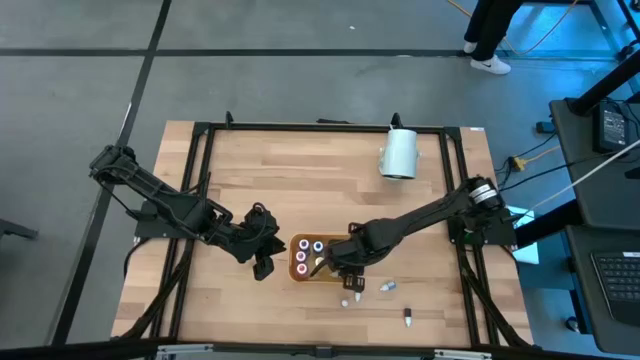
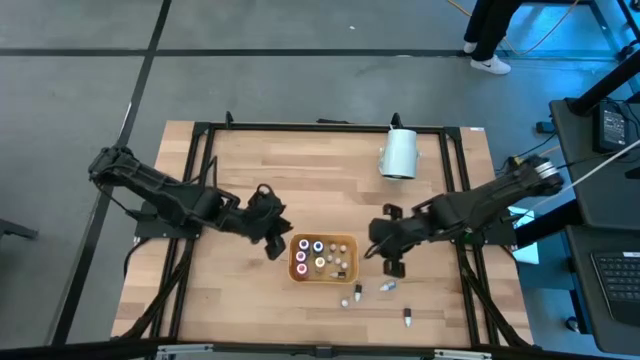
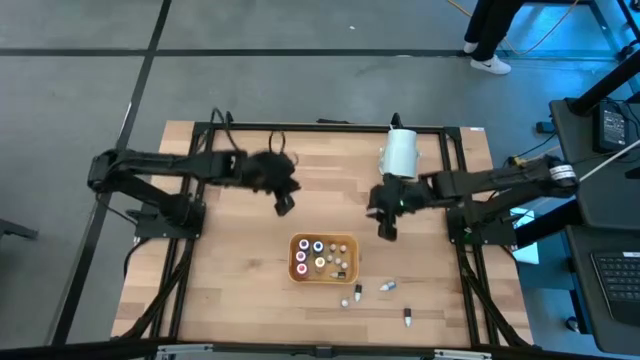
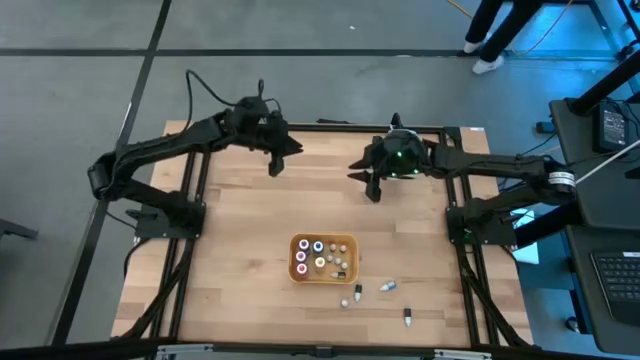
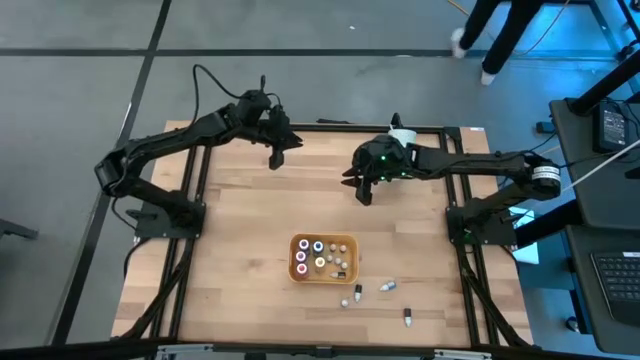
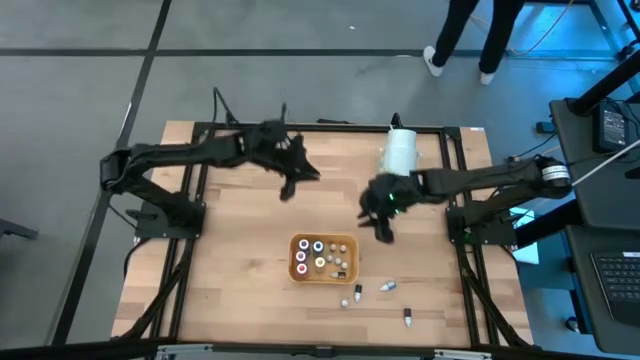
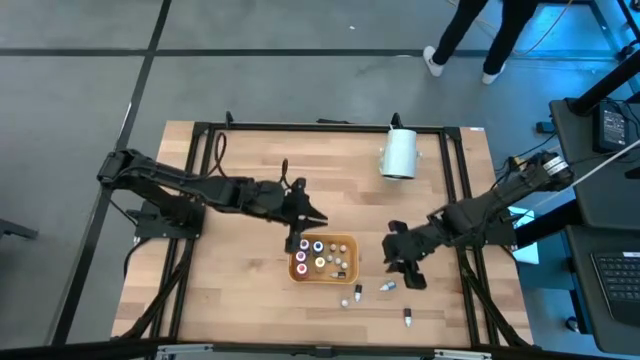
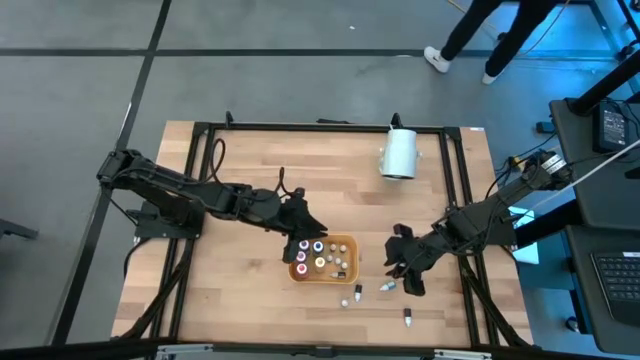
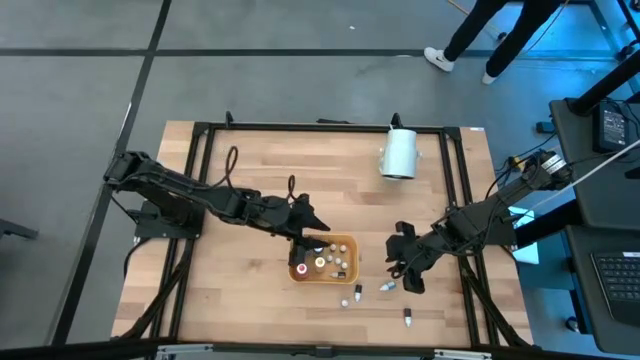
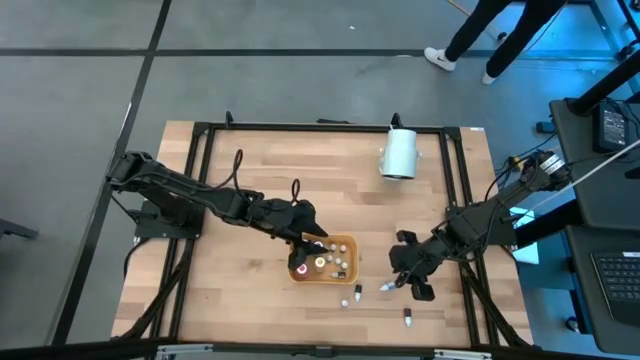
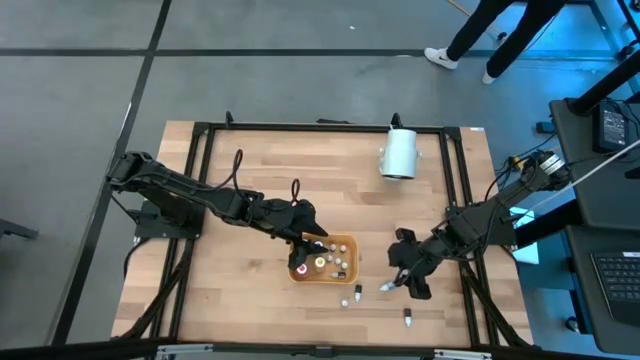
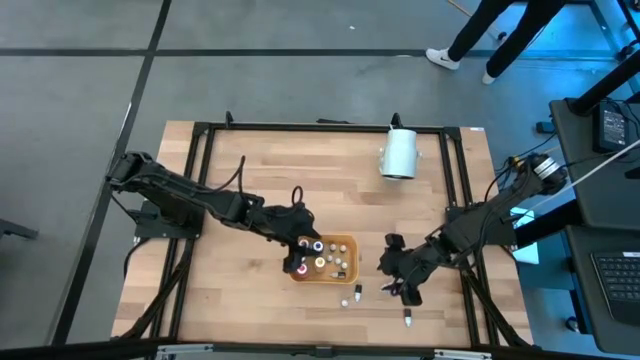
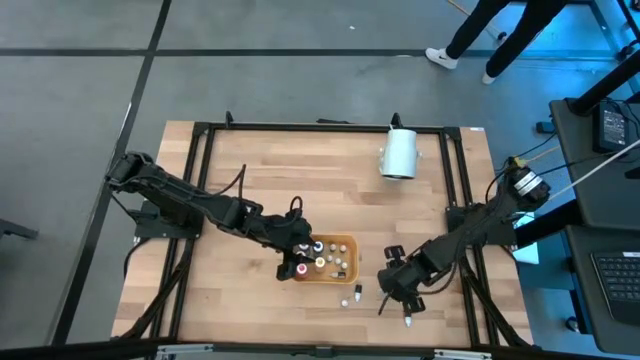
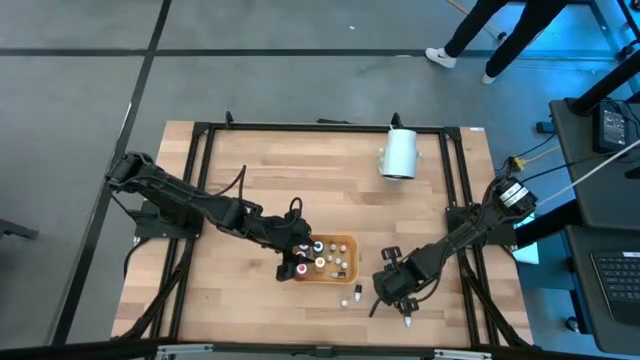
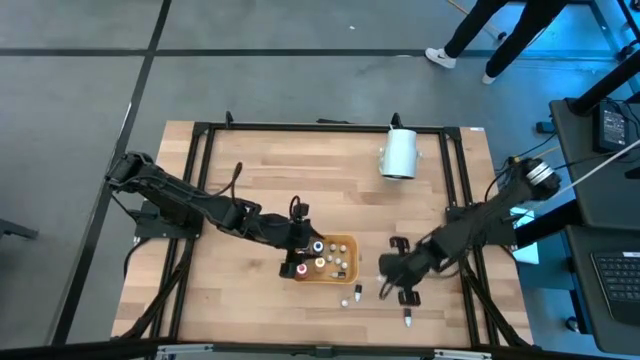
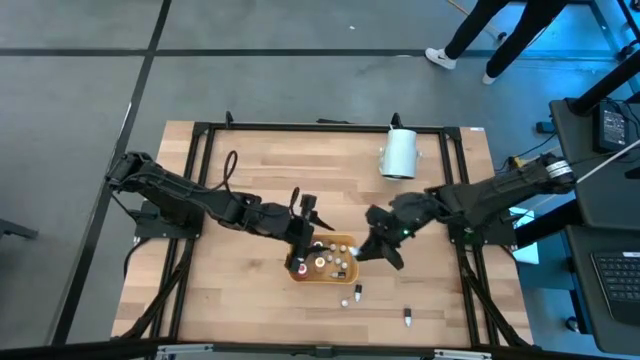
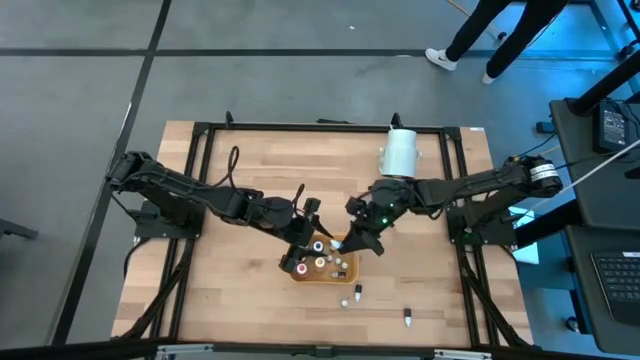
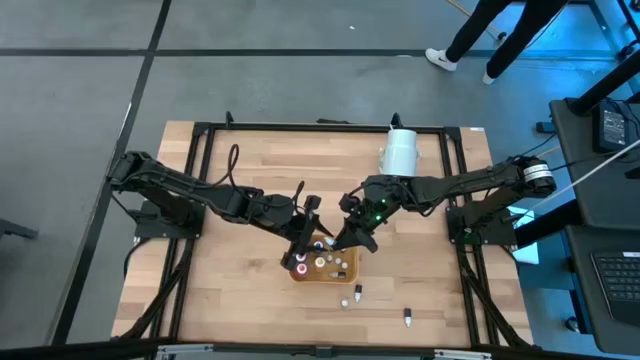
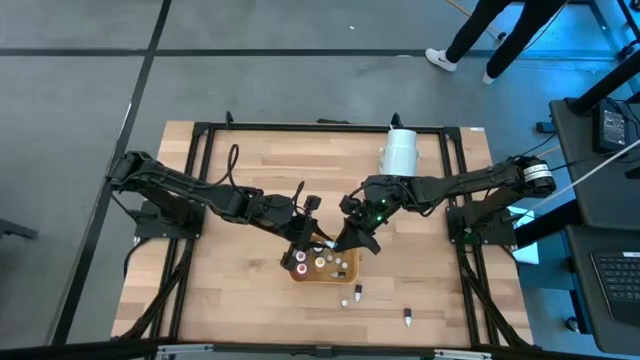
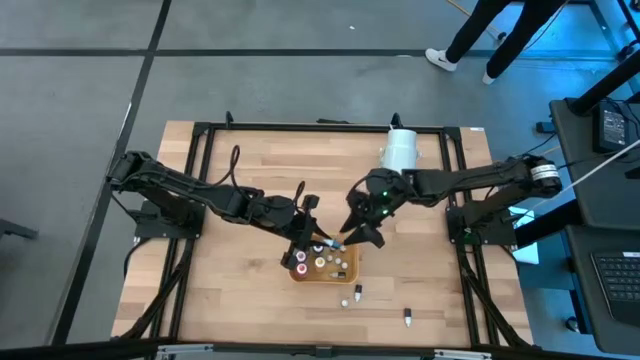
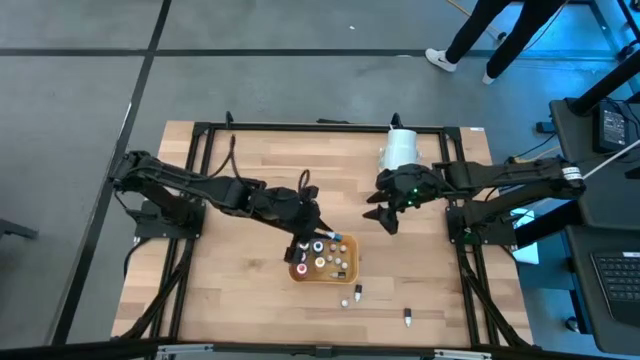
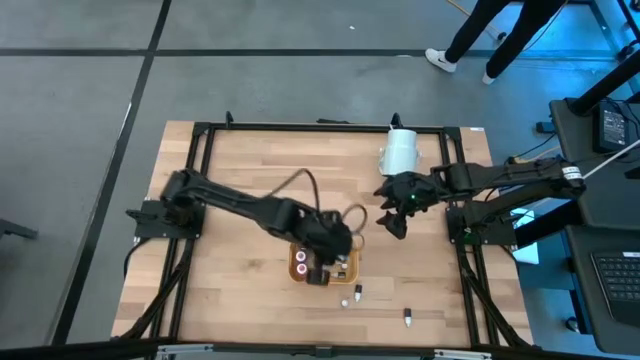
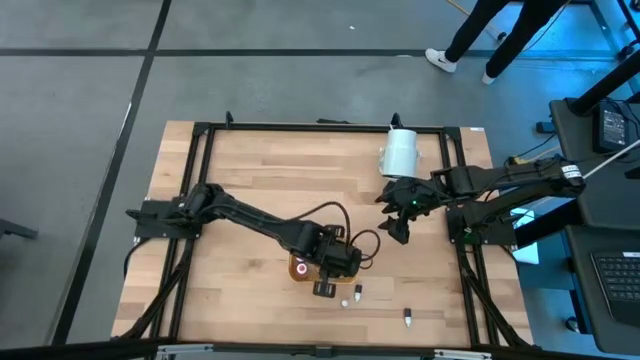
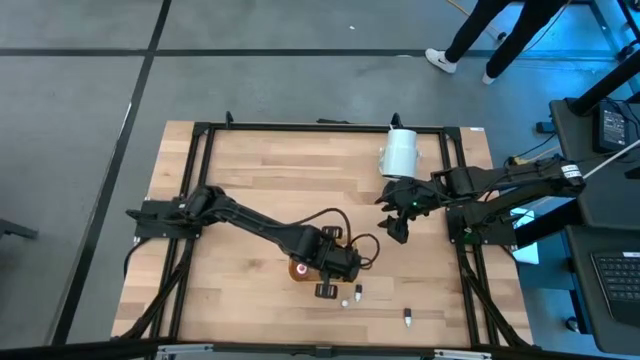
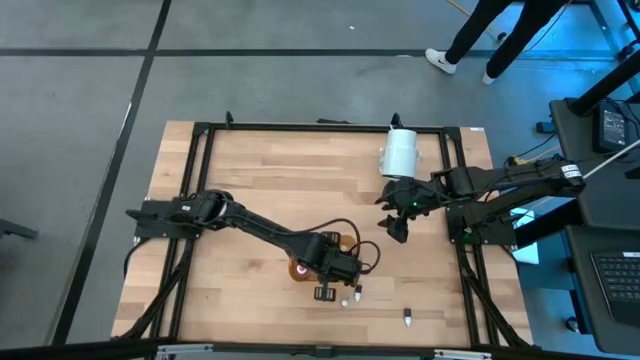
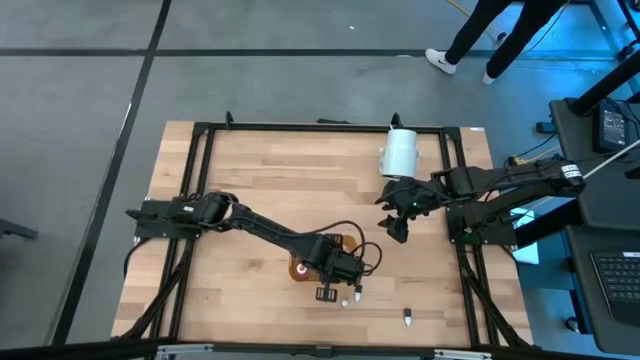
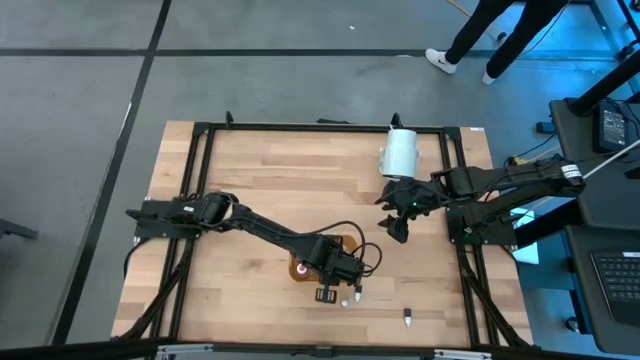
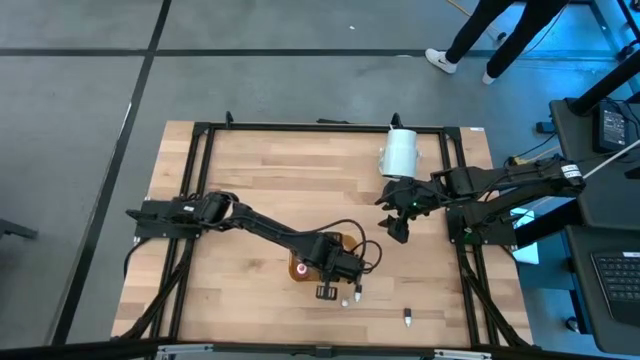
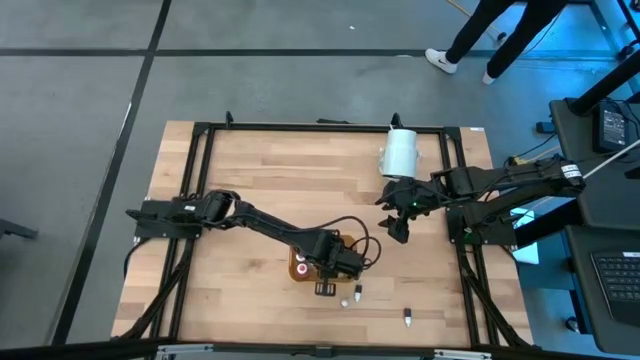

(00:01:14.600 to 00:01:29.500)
Task: Pick & Place food coloring
Put the small blue food coloring bottle in the yellow bin

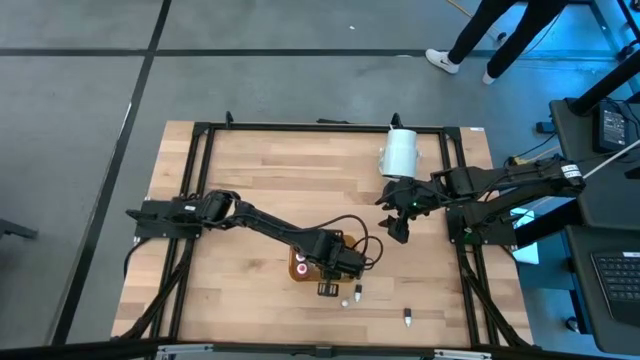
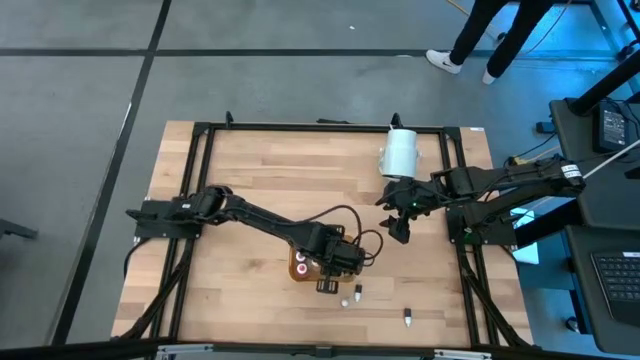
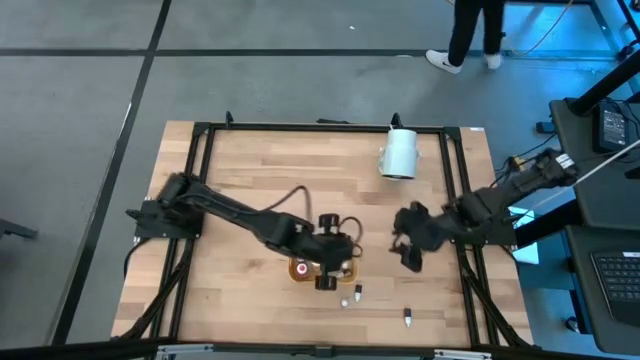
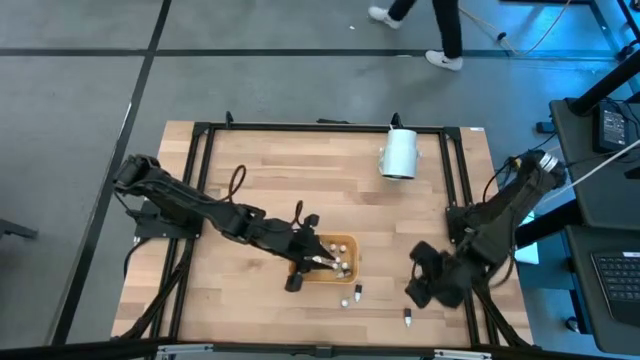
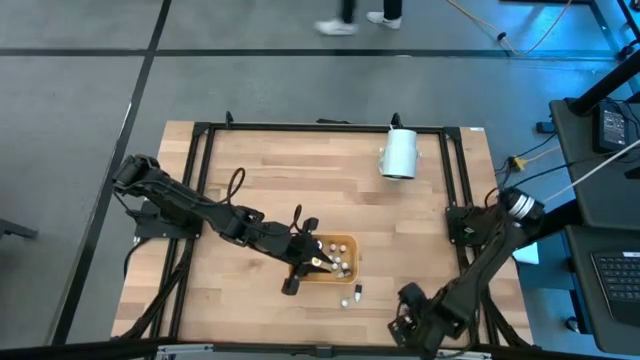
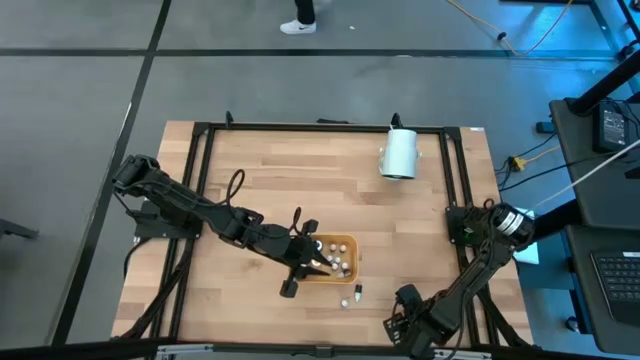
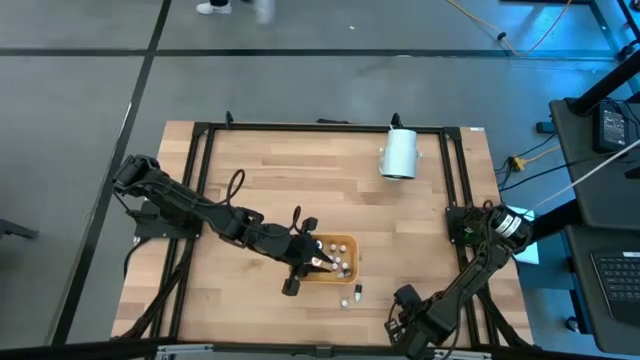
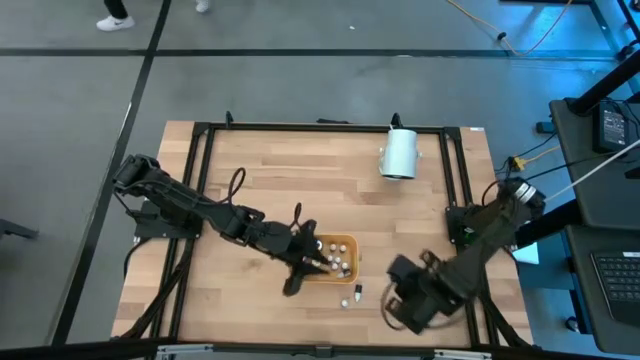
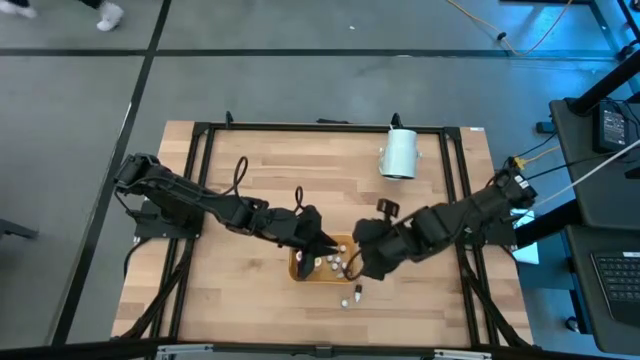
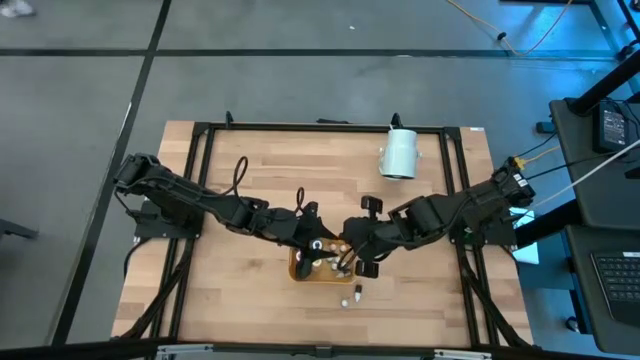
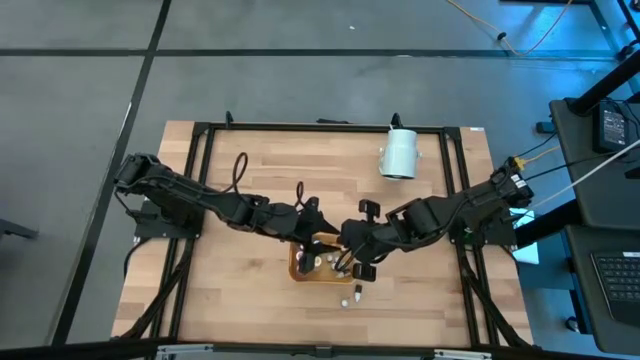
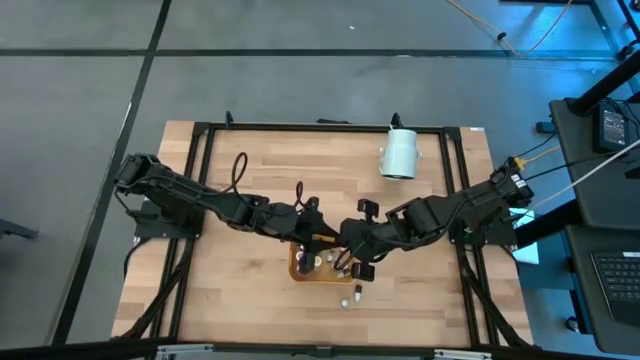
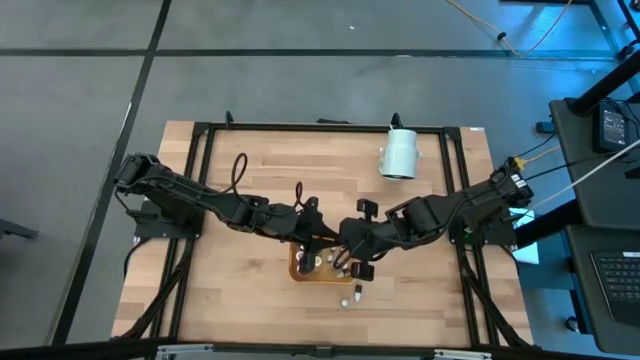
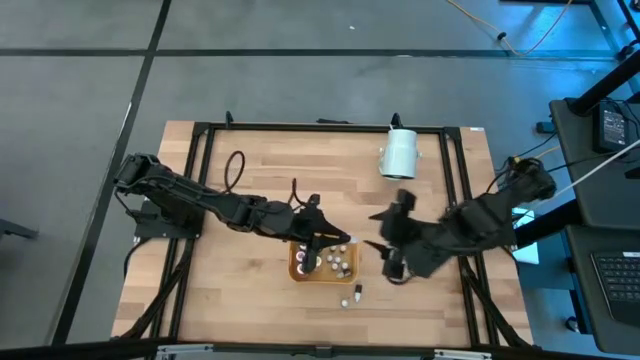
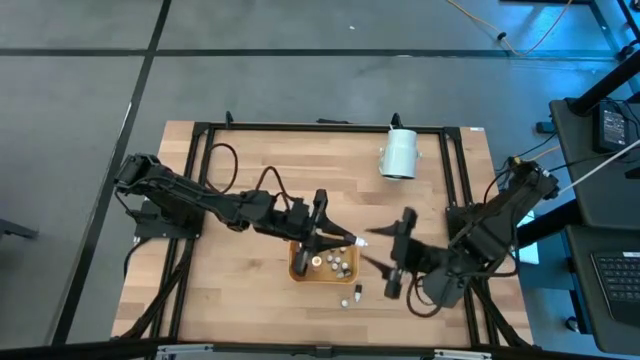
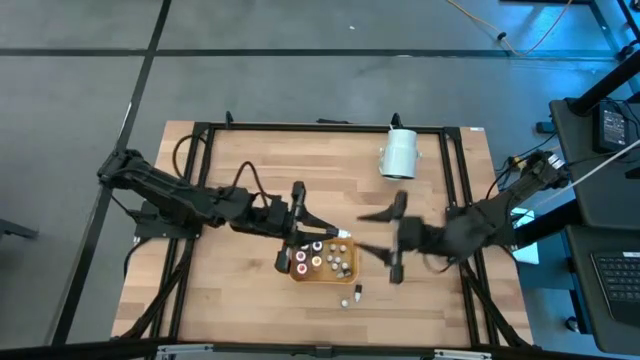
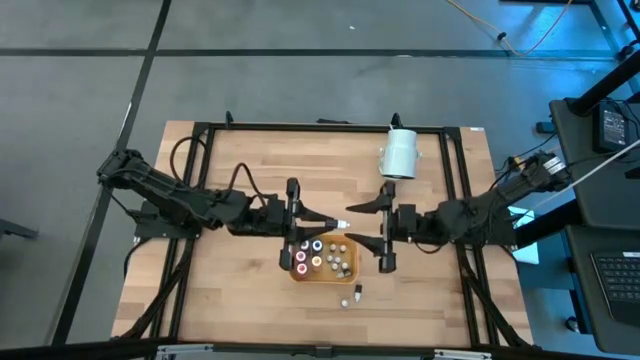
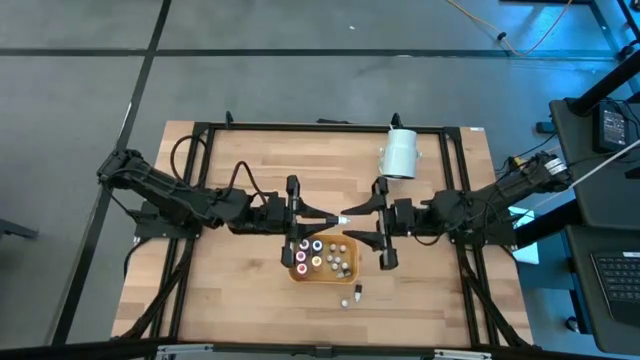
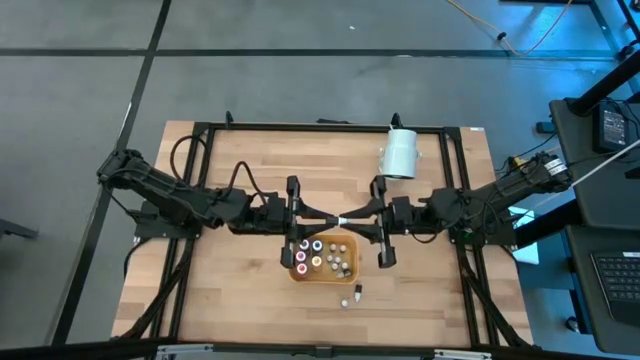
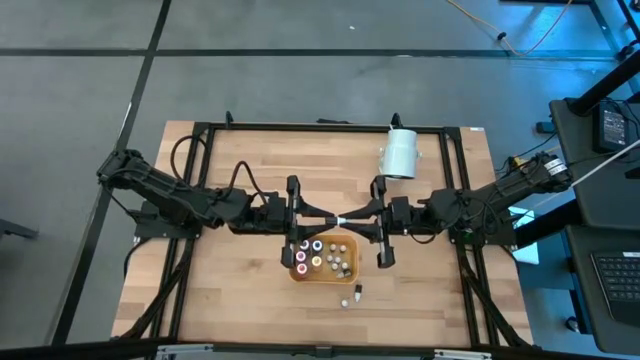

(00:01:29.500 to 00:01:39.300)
Put the small red food coloring bottle in the yellow bin
